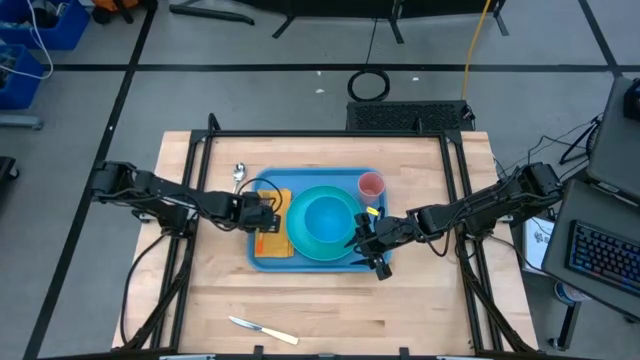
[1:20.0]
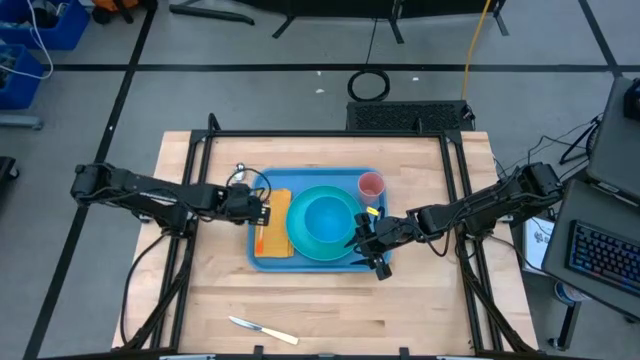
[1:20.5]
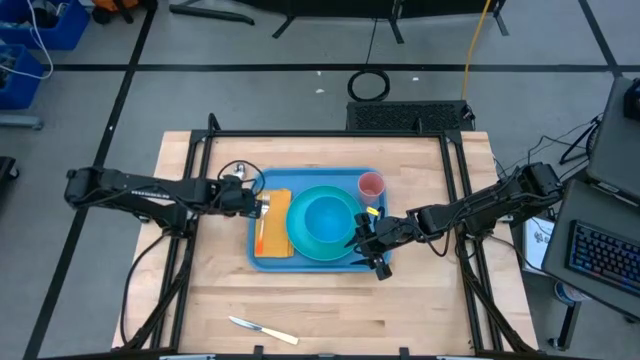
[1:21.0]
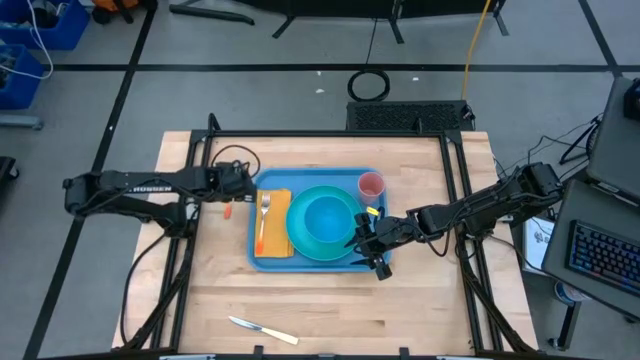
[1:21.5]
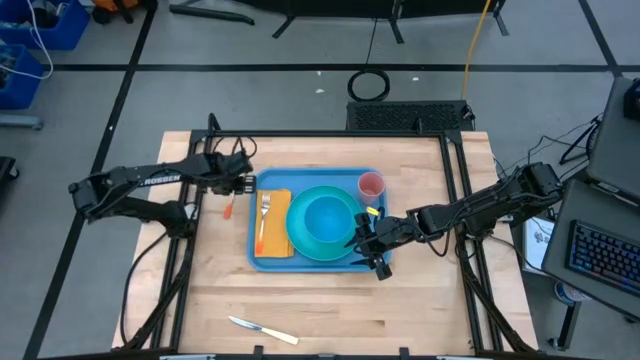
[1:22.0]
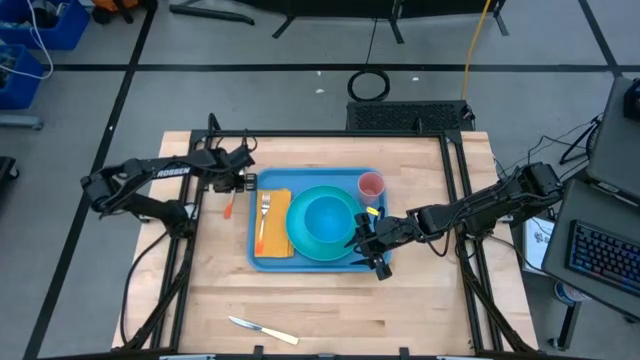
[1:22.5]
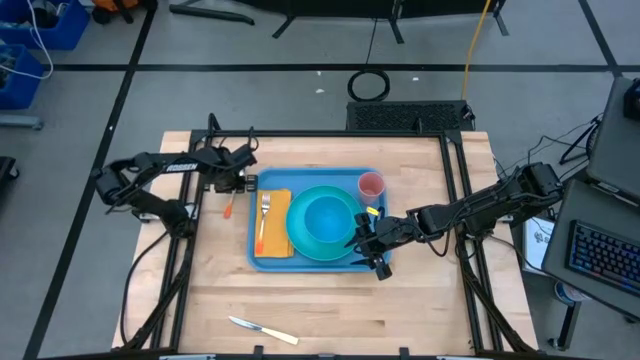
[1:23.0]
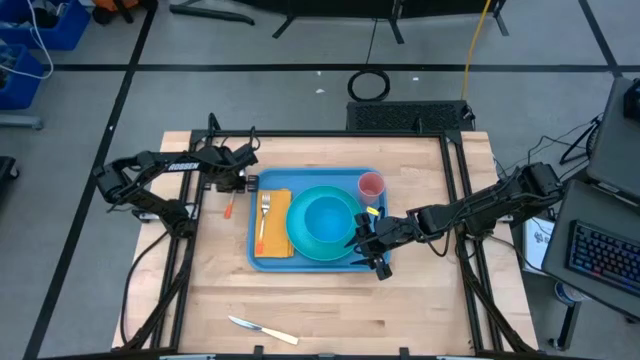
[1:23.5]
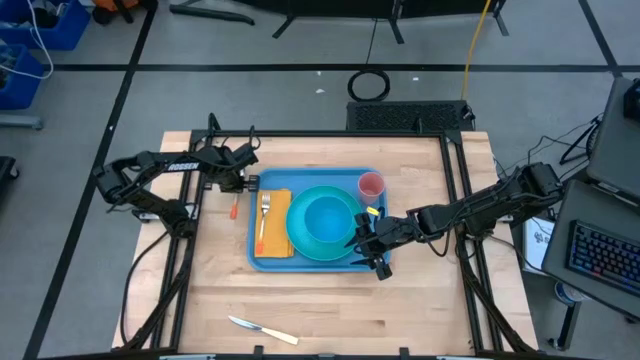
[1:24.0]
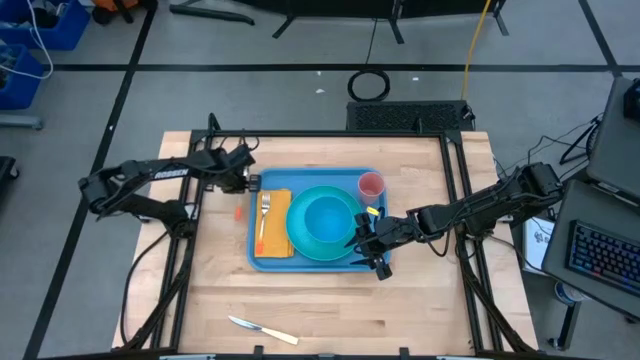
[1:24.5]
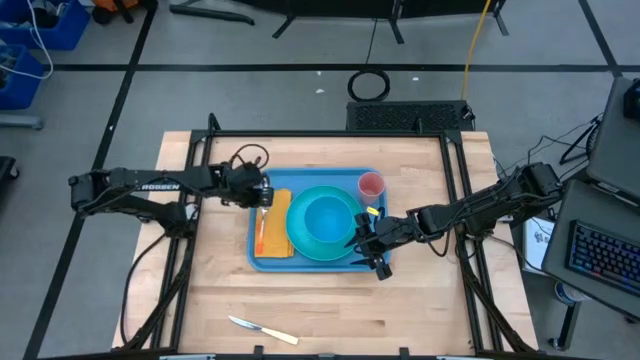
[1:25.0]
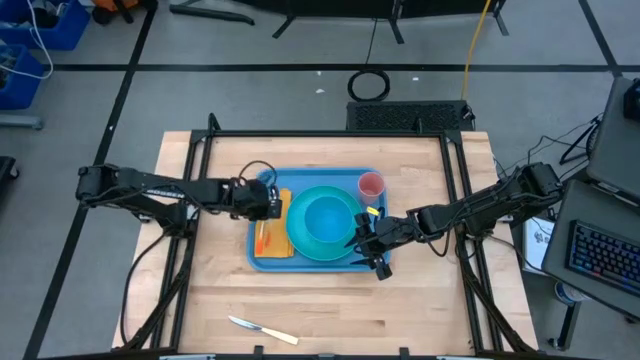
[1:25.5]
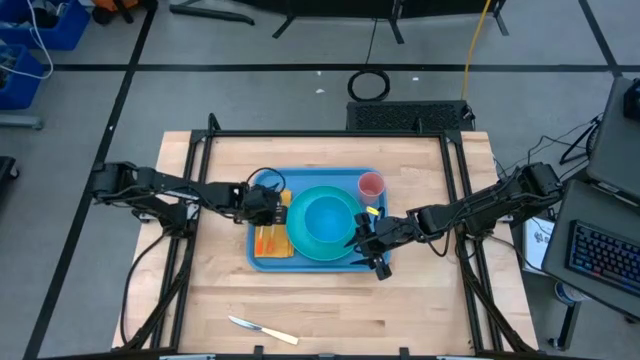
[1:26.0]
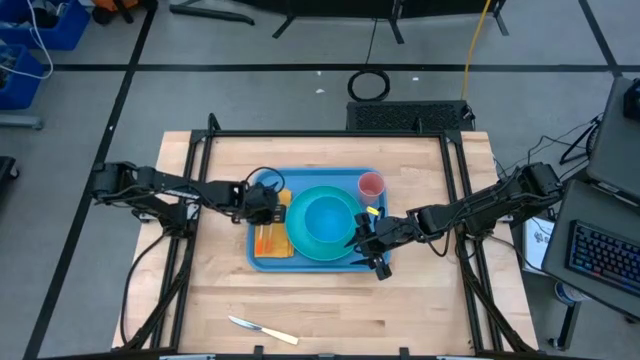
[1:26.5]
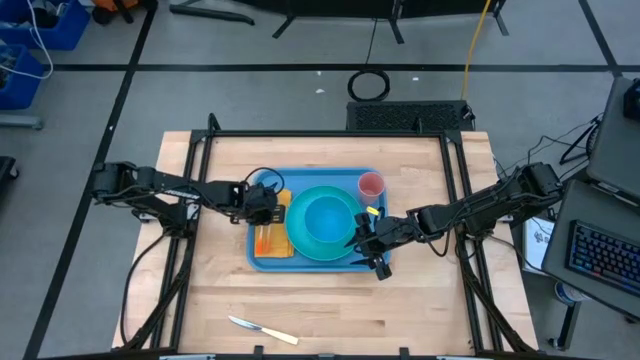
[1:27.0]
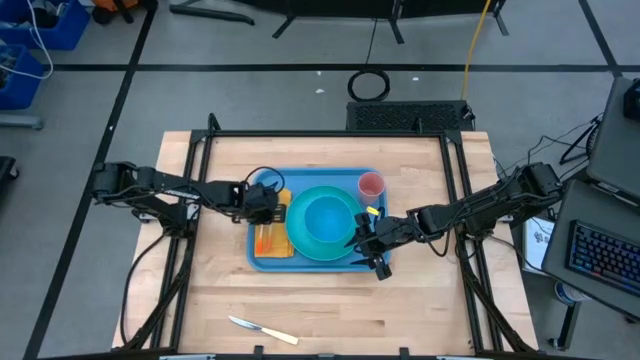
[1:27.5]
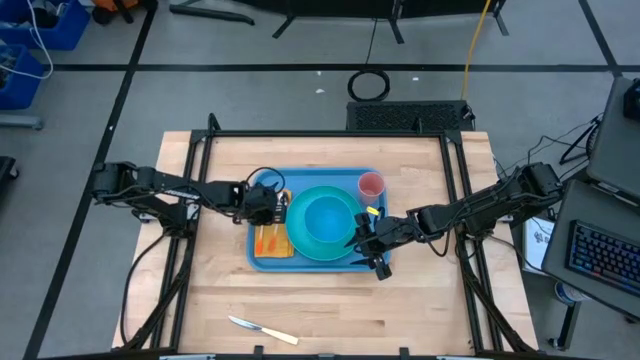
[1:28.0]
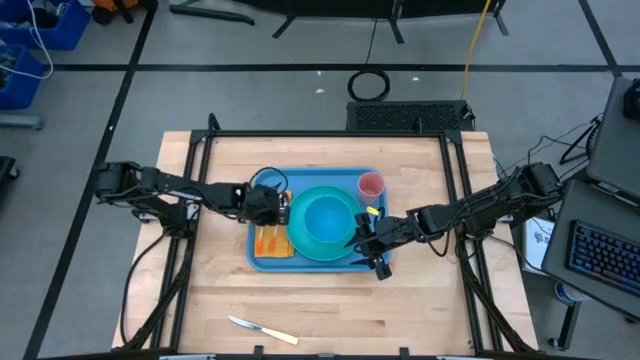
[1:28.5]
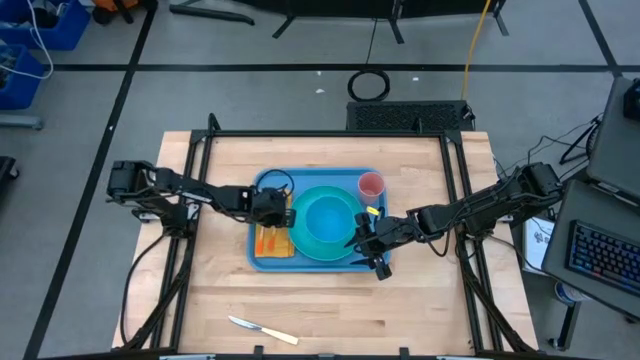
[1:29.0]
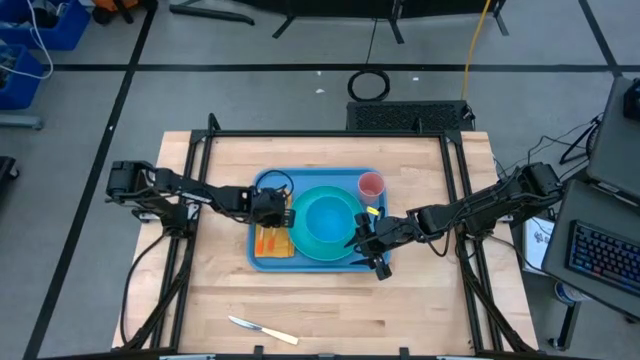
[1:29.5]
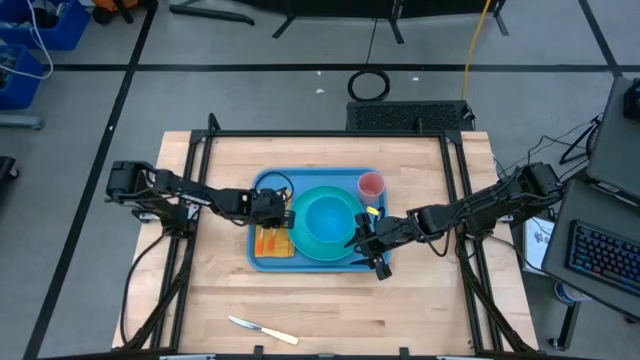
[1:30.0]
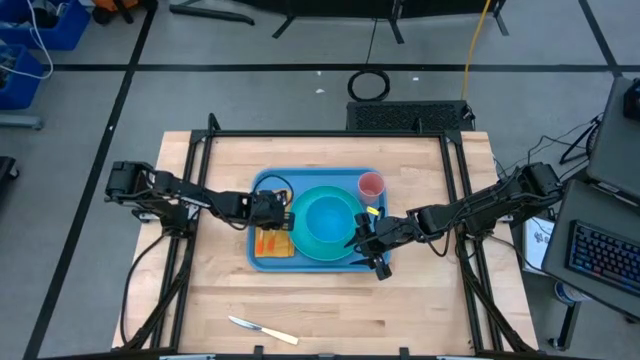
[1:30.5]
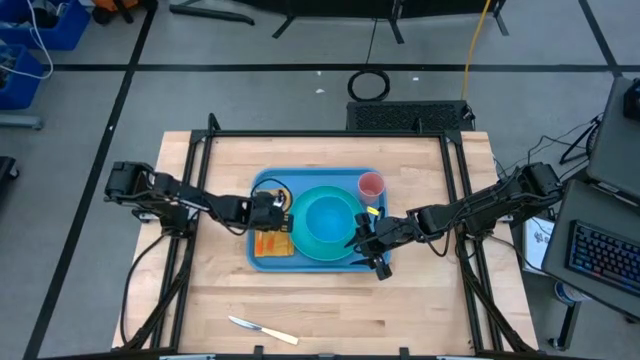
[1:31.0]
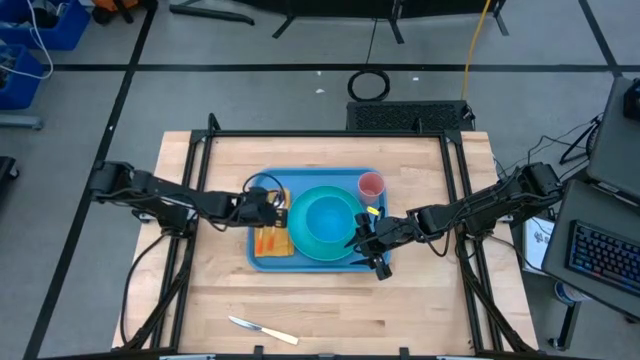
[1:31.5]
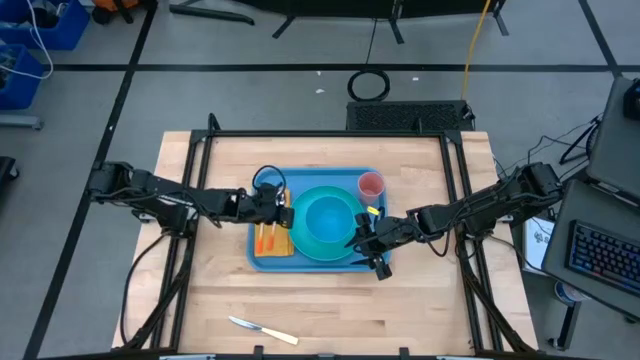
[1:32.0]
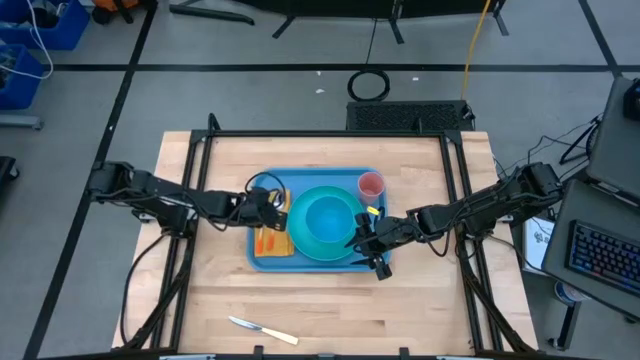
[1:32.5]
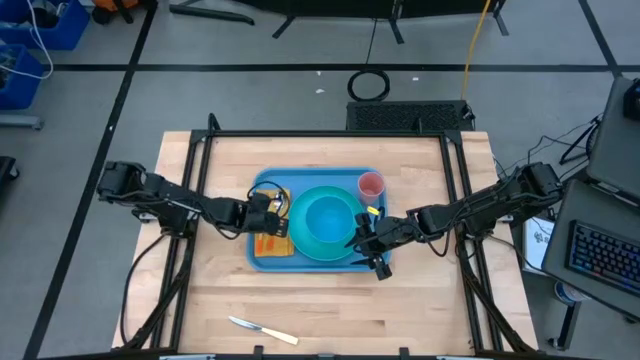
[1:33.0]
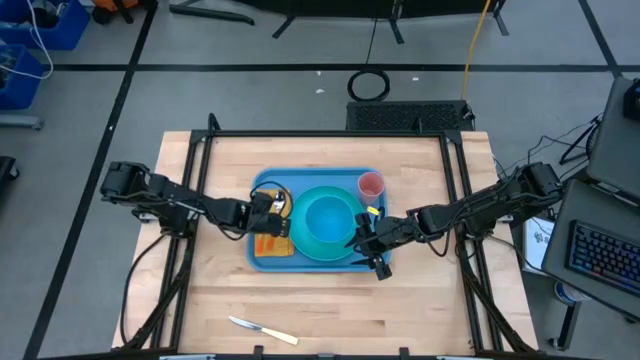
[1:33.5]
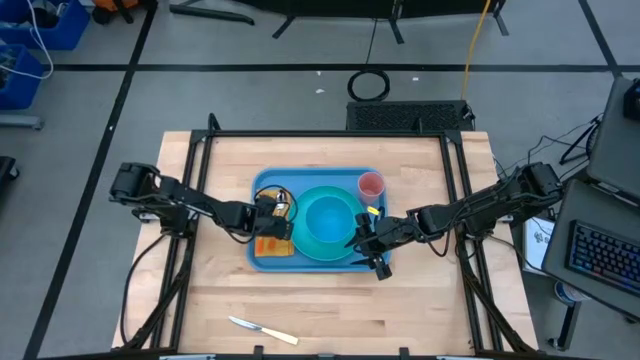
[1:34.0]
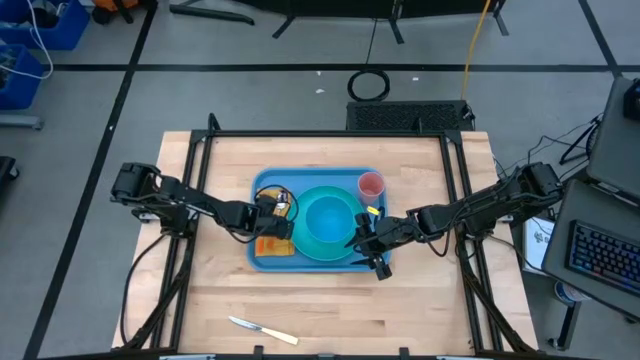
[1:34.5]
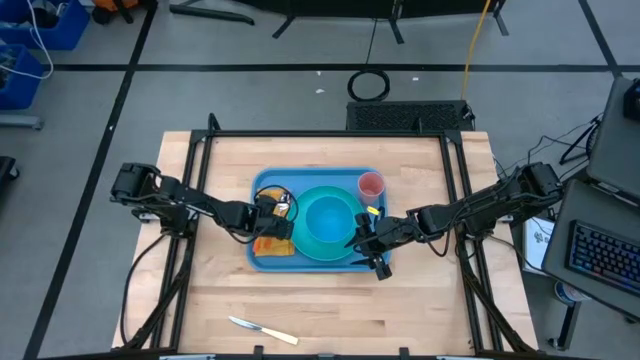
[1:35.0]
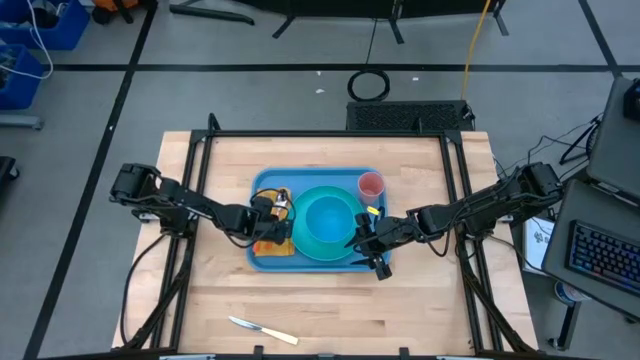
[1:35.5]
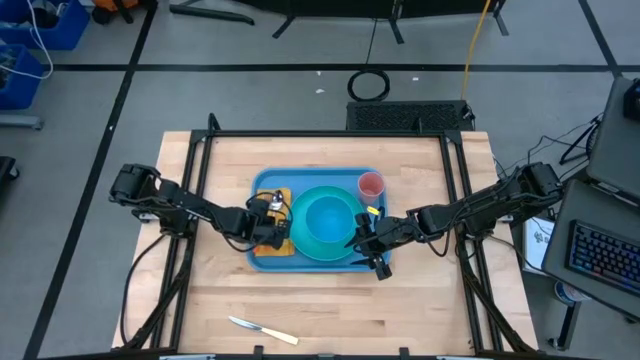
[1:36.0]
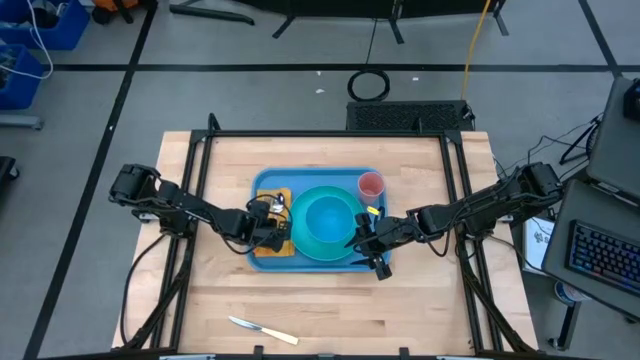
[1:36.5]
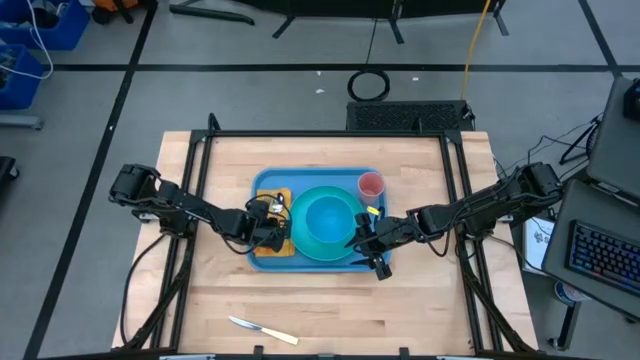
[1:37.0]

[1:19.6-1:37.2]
Task: Set up tray
Put the orange spoon on the yellow napkin

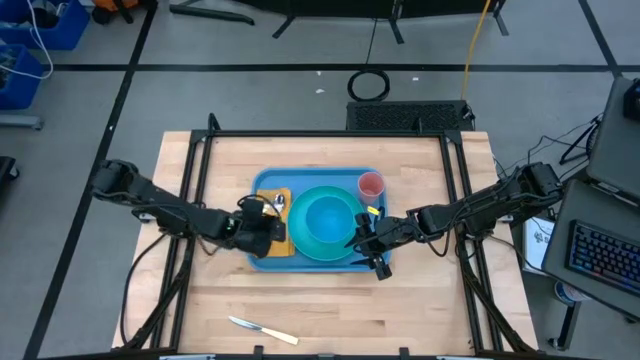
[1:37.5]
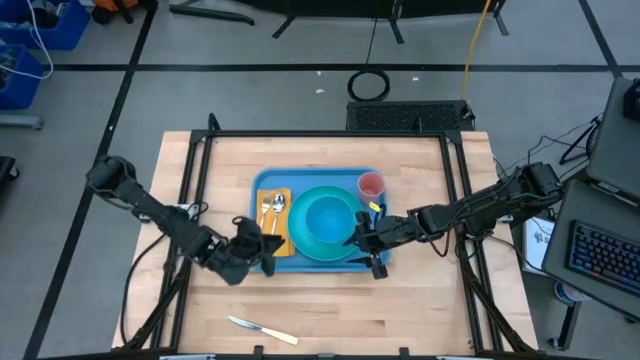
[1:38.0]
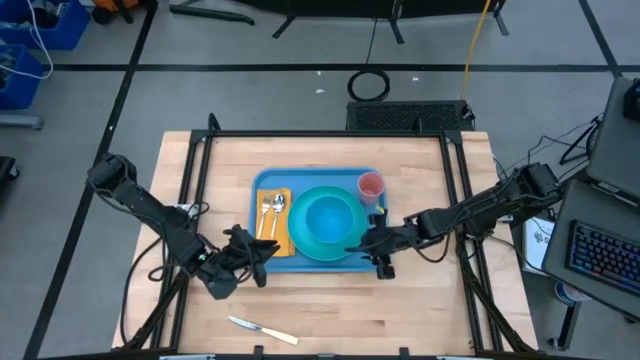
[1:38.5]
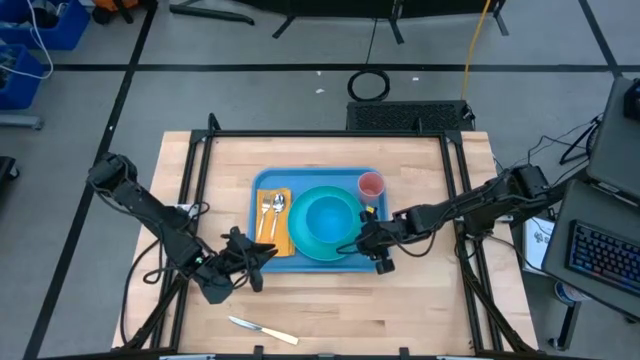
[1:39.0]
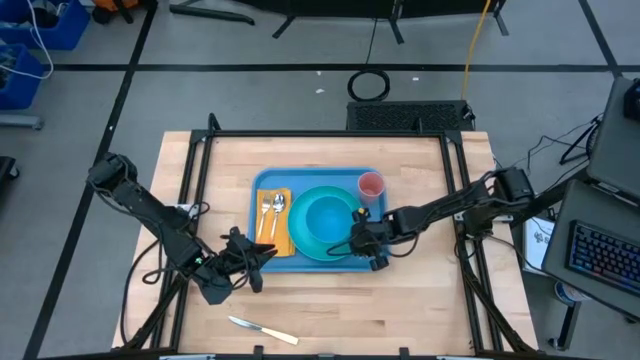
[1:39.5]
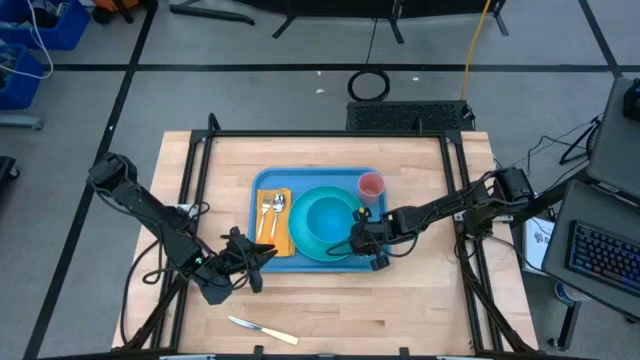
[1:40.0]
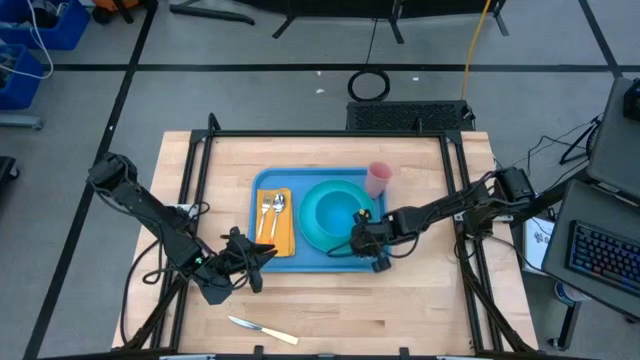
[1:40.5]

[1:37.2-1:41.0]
Adjust the blue plate
